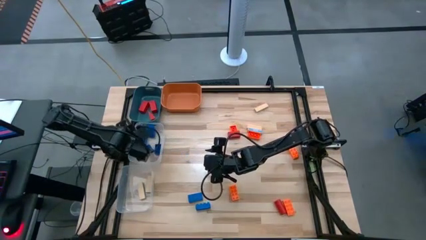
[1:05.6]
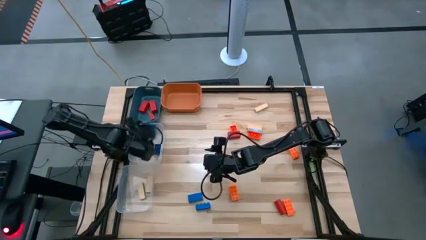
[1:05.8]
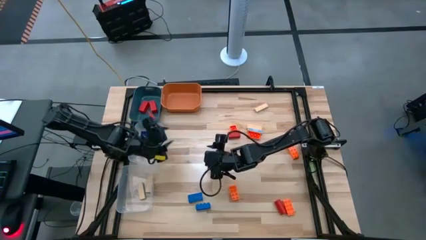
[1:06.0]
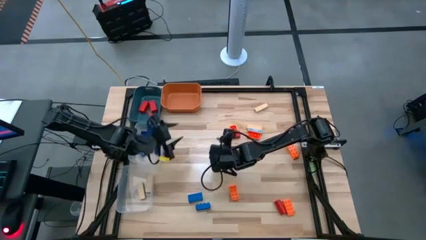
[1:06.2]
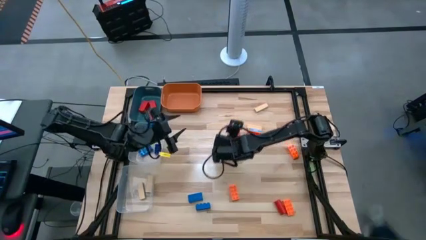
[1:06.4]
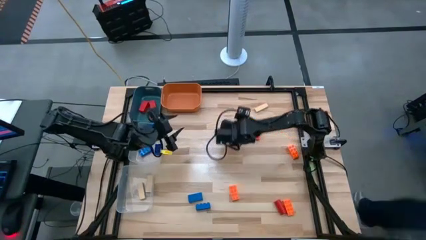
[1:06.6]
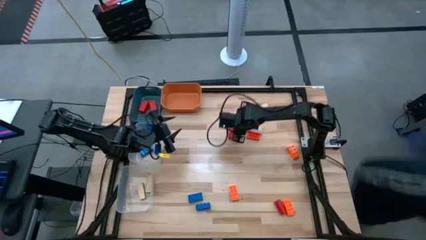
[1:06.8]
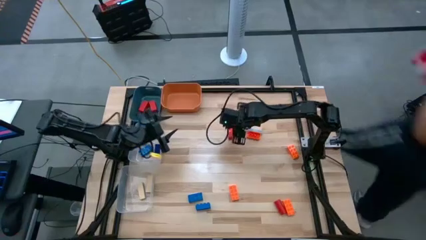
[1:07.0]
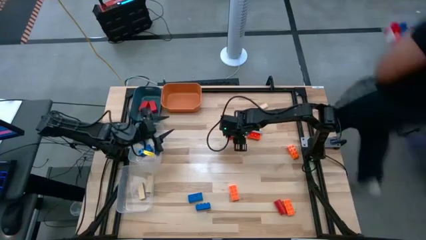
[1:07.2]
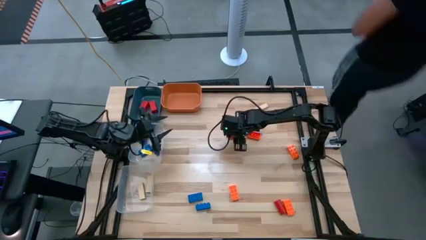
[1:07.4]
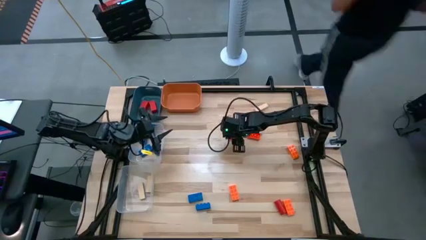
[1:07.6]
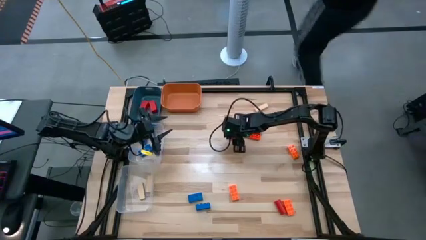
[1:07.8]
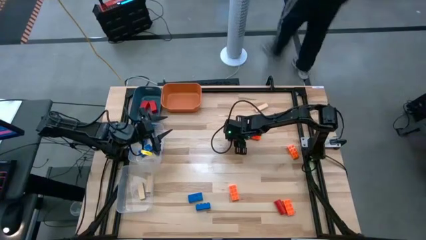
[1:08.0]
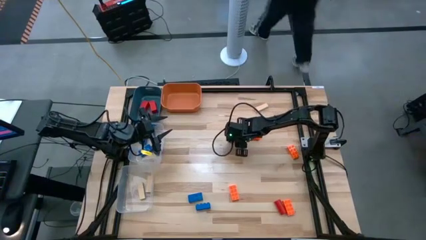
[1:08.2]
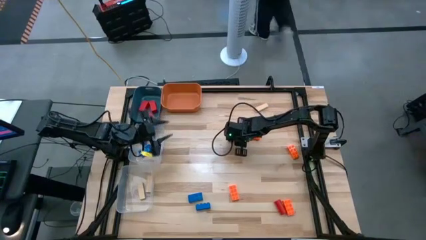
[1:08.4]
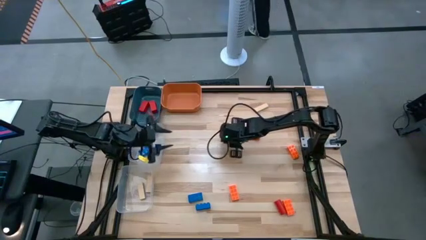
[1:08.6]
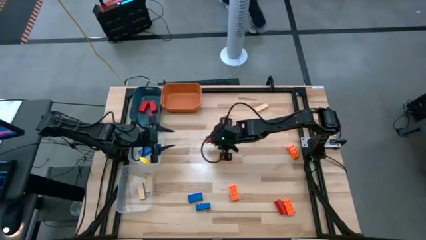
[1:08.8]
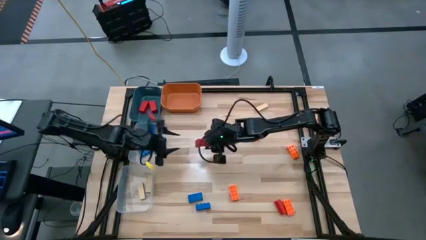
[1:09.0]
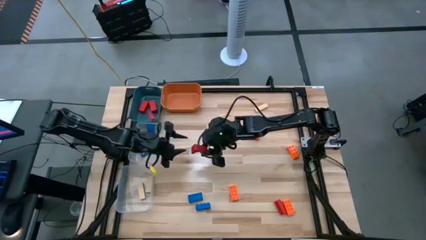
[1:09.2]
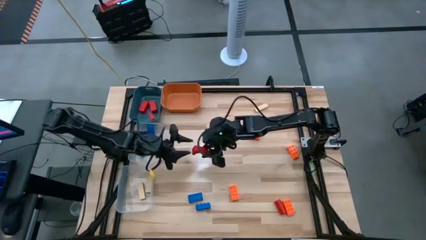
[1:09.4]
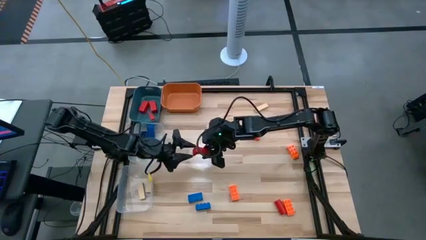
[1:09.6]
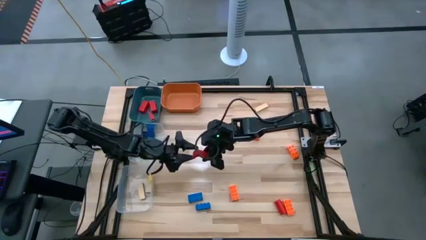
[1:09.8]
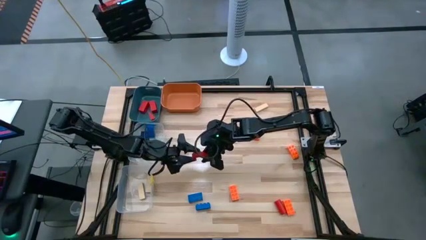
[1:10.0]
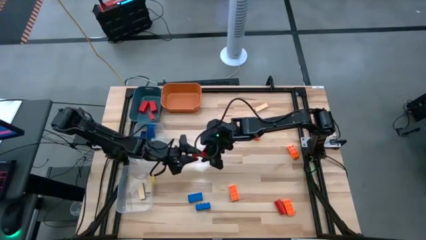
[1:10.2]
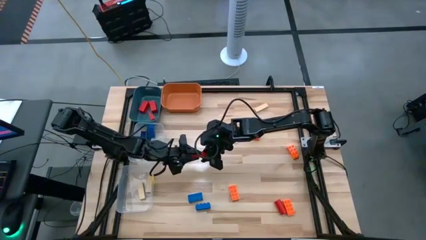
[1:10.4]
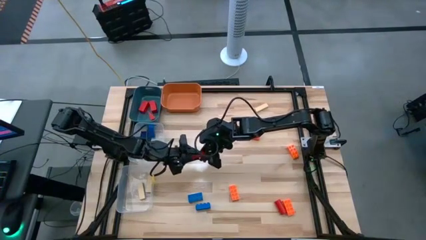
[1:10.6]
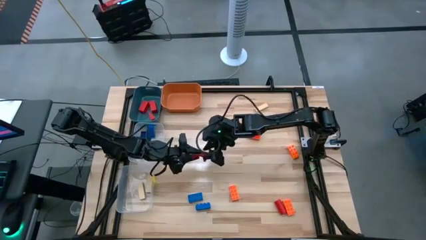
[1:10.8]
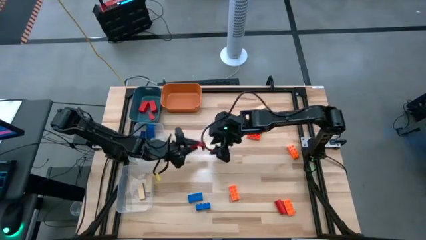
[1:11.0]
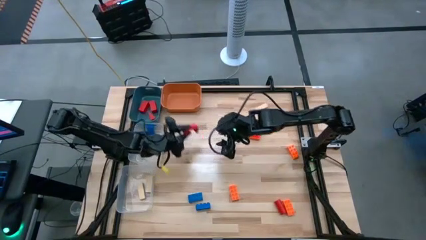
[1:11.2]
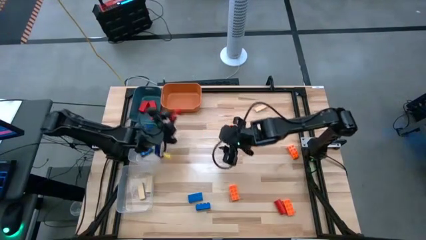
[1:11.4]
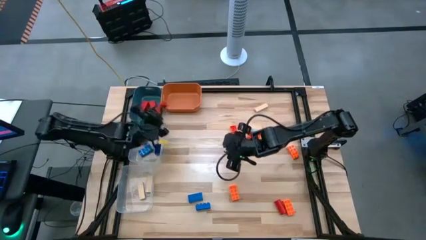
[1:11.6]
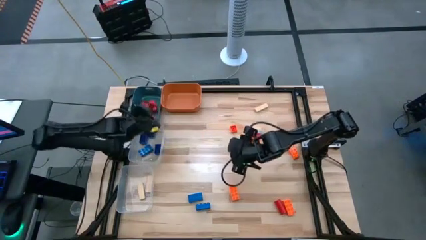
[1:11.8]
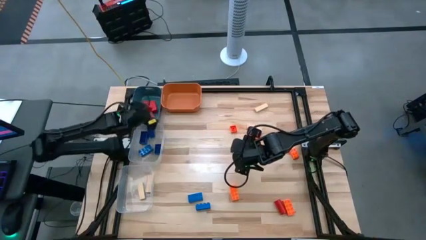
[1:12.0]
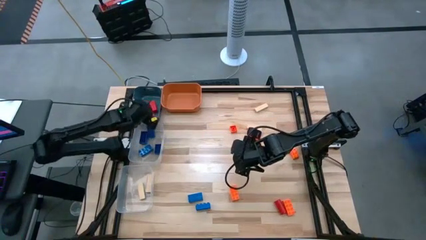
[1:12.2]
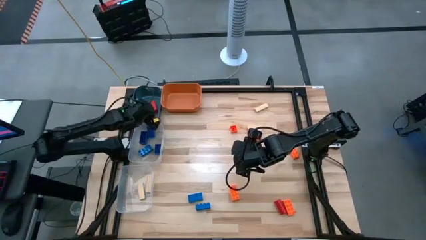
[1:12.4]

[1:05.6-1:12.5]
Task: Sort blocks
Put the wooden red block into the blue bin

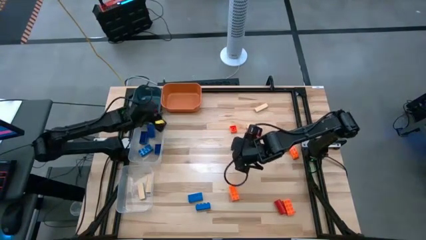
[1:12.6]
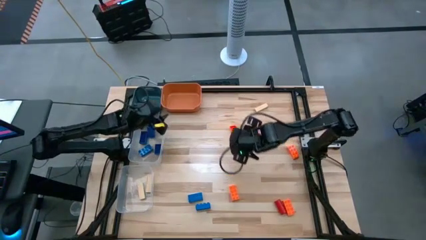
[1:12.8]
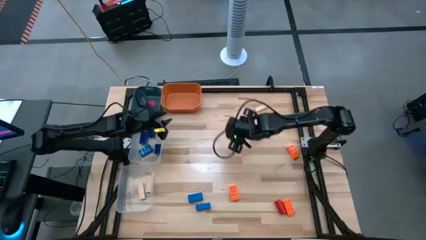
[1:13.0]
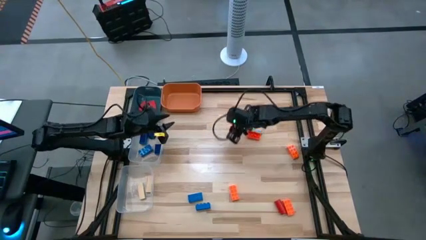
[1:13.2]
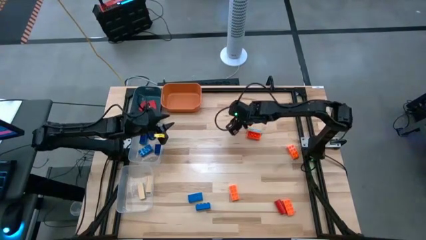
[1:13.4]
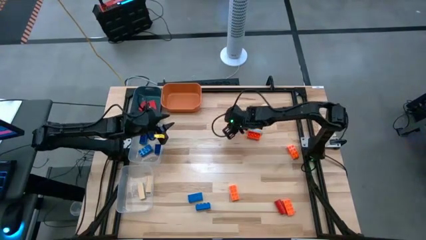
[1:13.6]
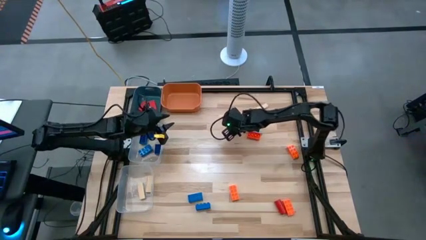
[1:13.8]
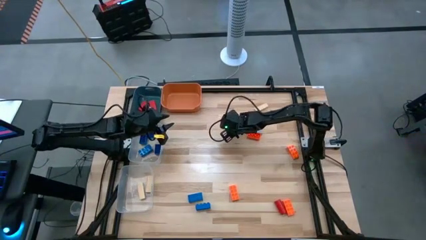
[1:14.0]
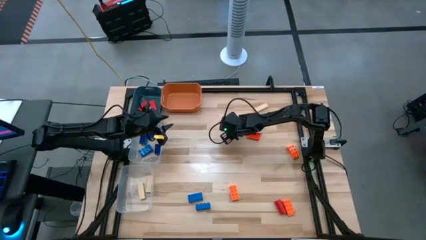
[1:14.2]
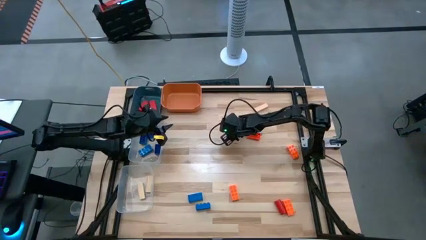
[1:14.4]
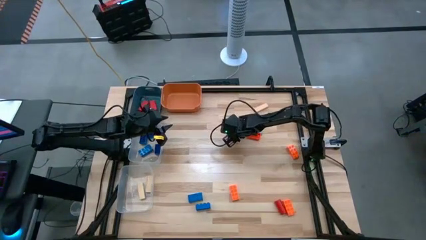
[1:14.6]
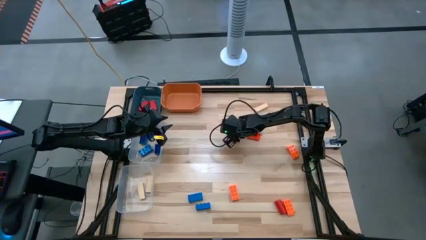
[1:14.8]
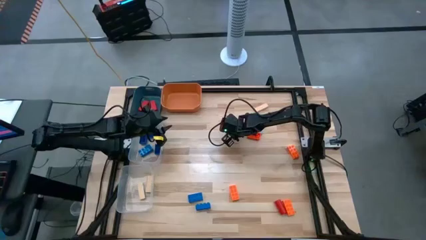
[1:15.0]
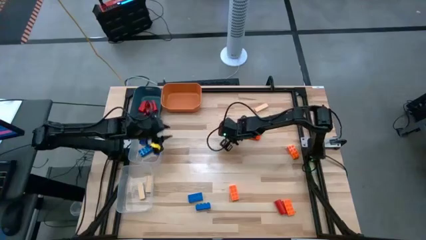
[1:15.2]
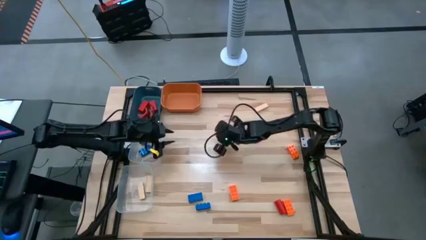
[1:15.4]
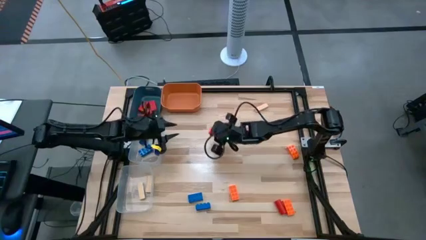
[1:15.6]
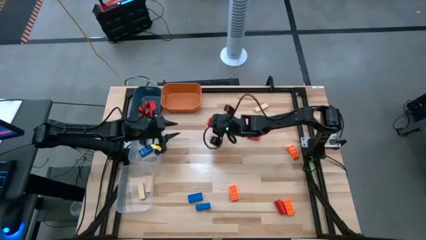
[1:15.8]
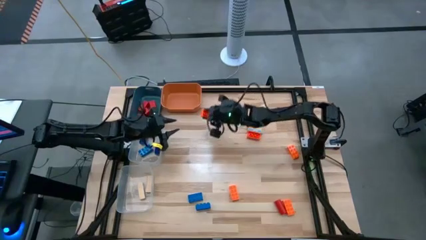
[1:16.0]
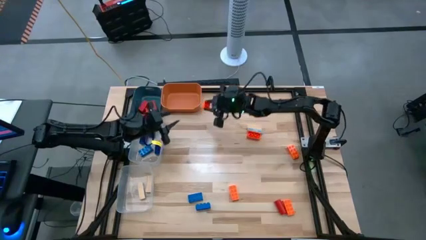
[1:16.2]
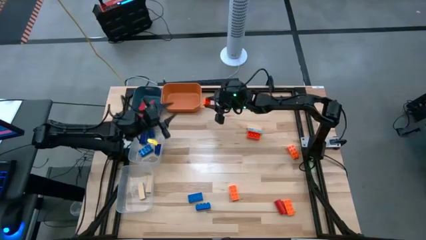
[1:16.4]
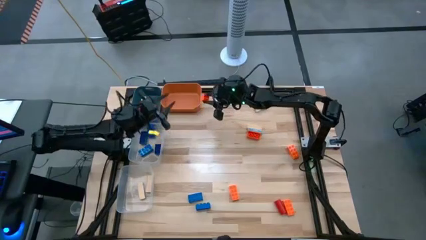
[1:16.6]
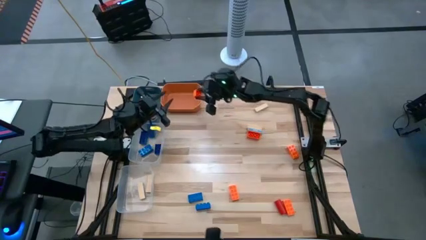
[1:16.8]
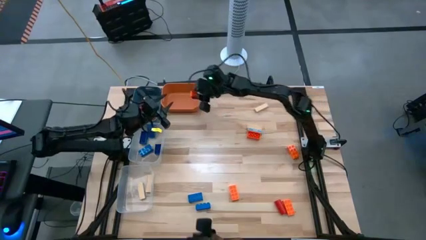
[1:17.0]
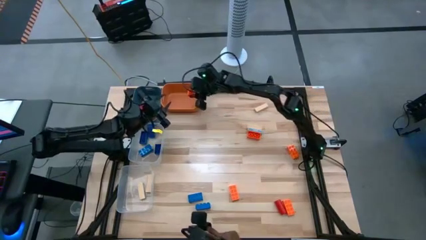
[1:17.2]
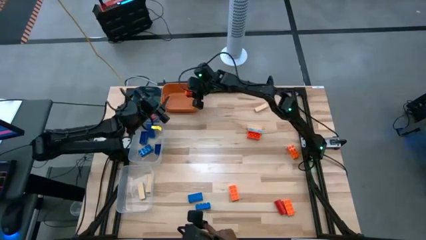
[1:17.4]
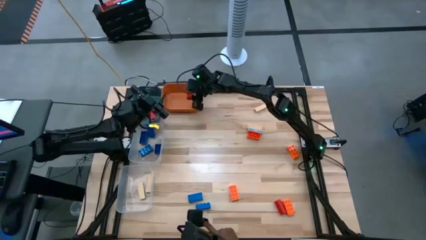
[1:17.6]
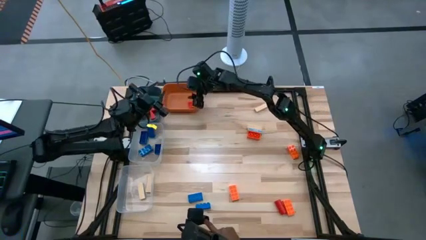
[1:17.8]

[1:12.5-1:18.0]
Put the orange game piece into the orange bin

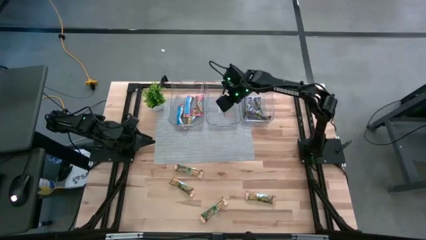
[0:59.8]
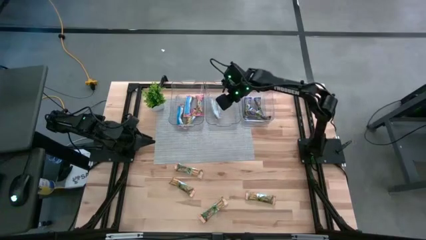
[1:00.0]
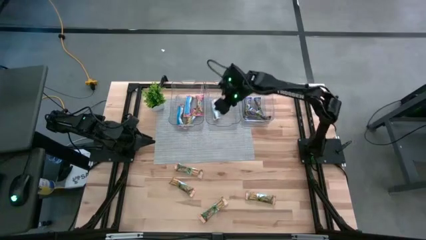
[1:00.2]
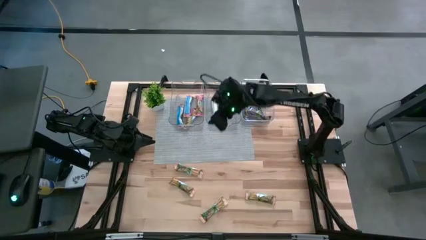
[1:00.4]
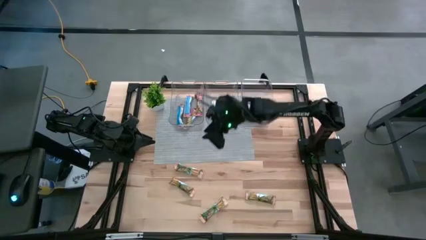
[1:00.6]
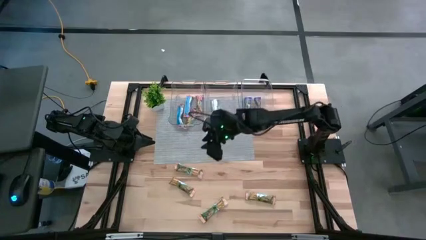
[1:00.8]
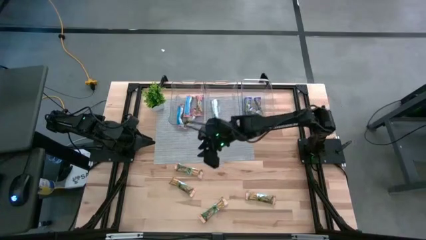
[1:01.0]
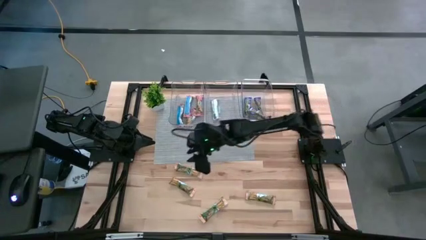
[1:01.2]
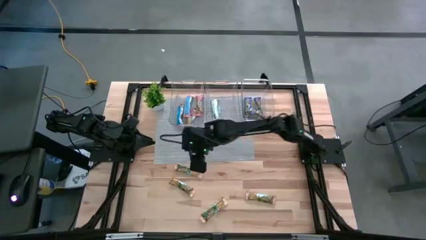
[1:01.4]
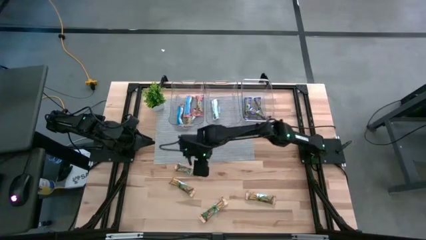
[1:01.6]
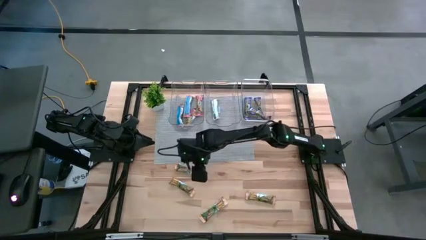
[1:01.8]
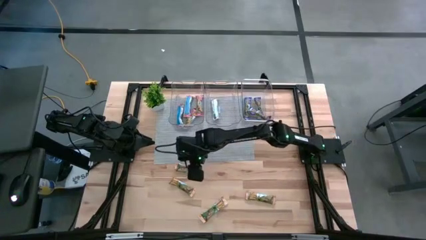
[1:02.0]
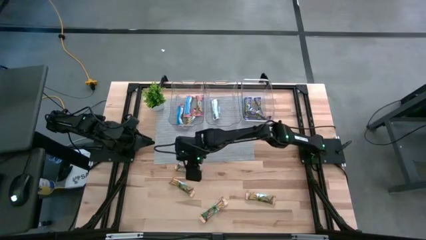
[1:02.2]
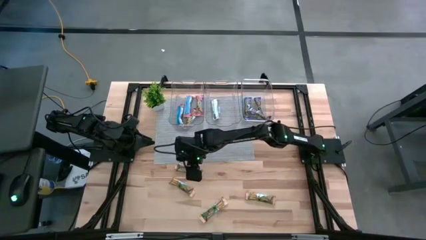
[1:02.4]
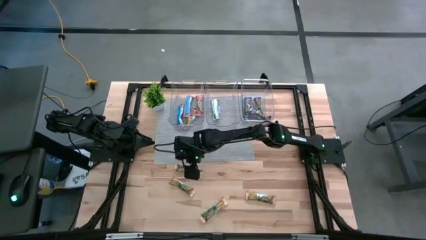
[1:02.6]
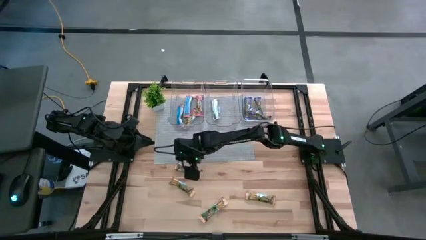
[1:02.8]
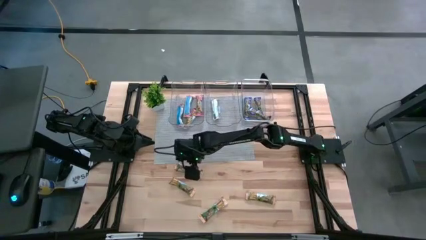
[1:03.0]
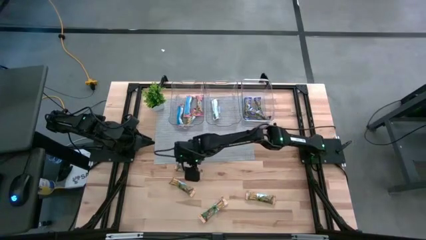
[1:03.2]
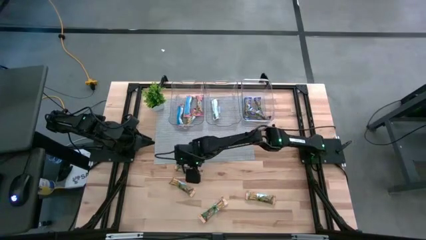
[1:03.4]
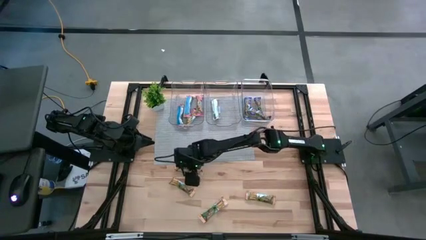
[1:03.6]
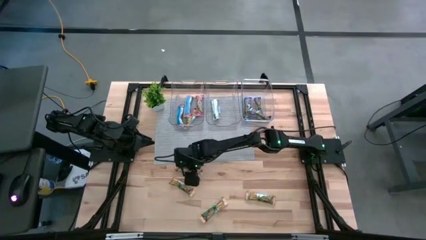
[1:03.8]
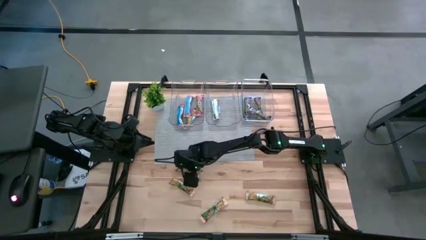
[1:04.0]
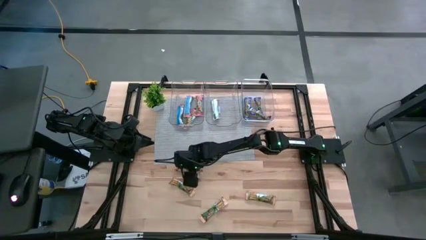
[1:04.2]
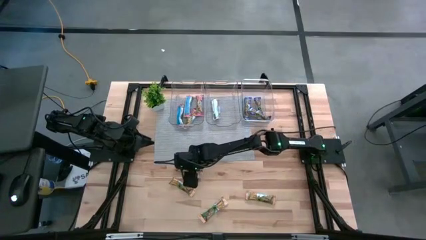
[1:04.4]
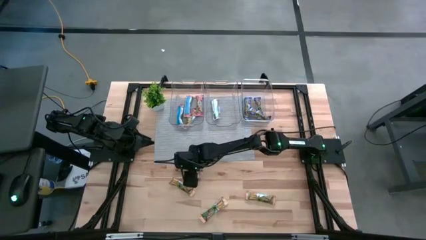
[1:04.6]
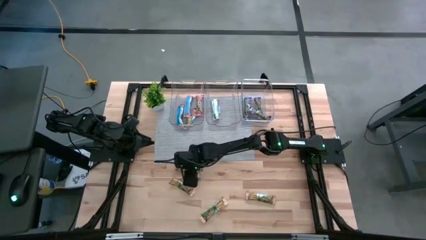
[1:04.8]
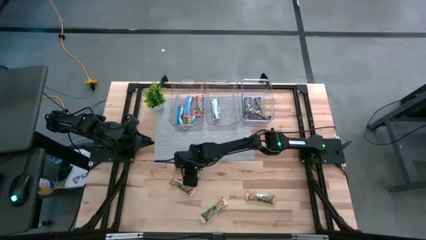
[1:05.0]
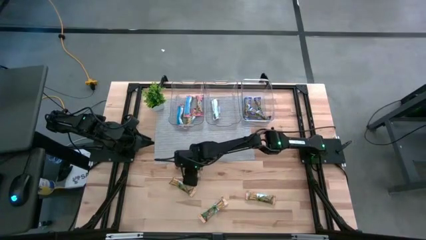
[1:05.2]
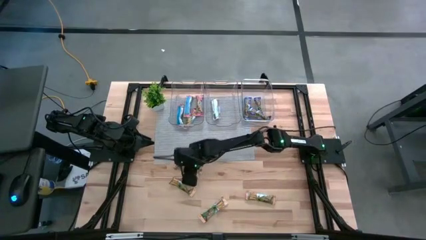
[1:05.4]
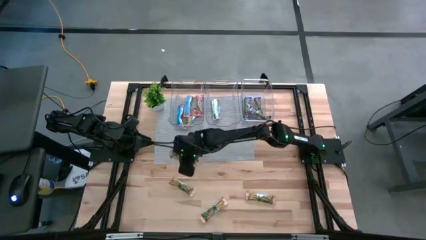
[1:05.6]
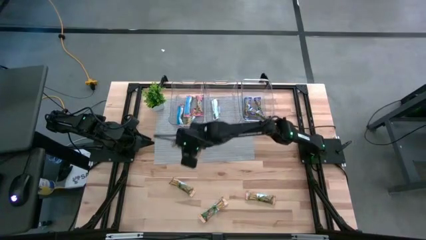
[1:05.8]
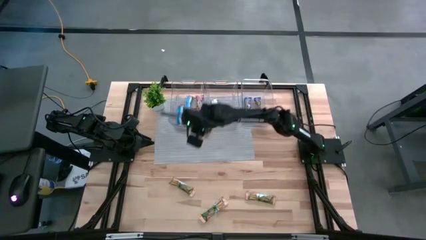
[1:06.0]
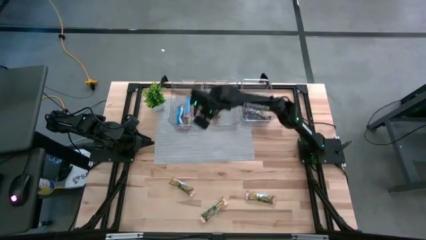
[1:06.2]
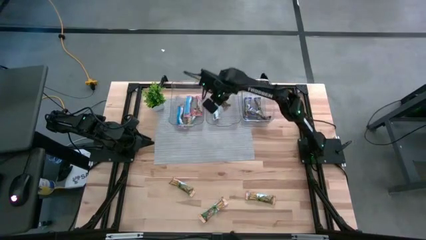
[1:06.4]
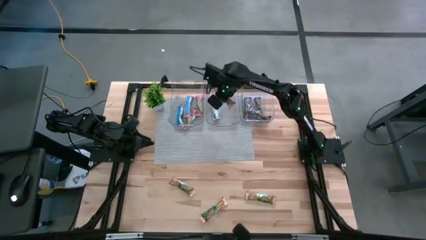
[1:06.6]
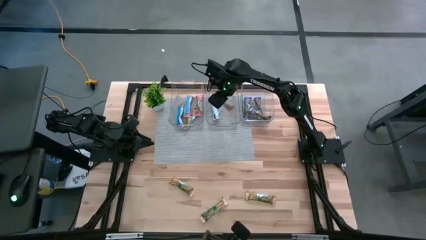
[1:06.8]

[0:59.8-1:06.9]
Task: Pick and place Granola Bars by type
Put the yellow granola bar into the middle transparent bin
